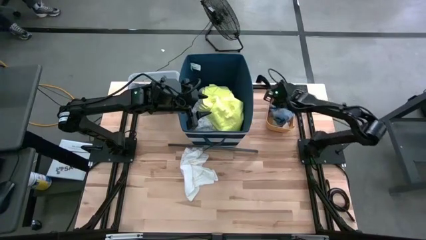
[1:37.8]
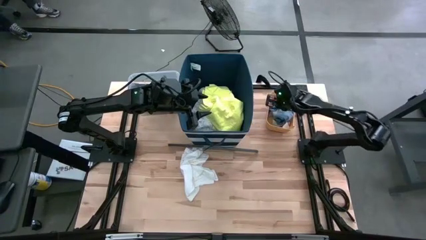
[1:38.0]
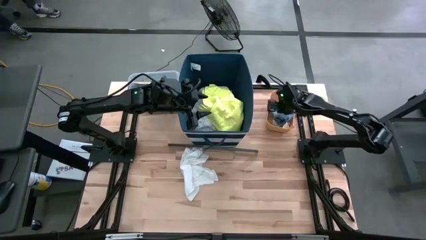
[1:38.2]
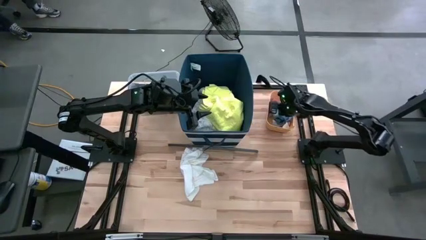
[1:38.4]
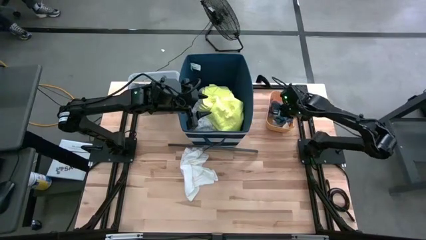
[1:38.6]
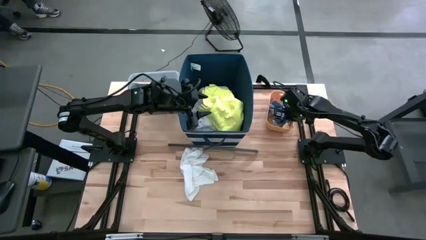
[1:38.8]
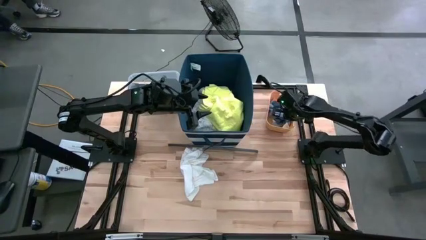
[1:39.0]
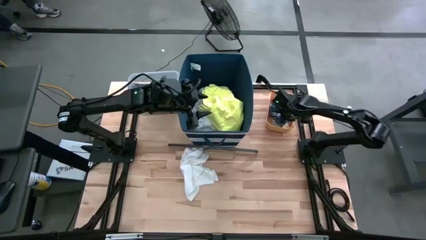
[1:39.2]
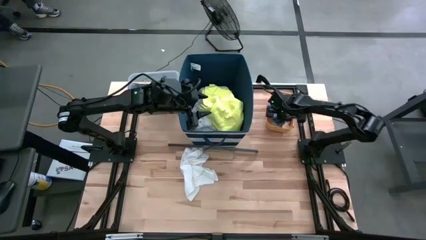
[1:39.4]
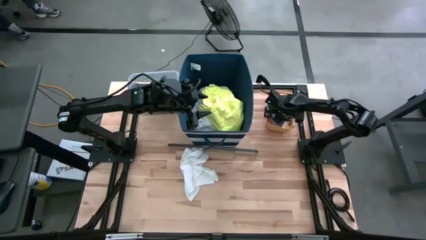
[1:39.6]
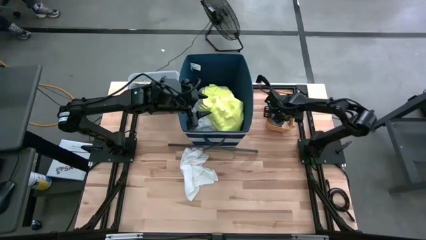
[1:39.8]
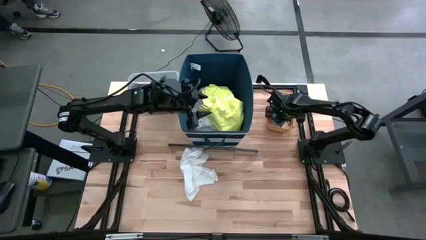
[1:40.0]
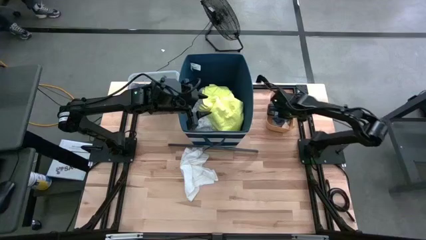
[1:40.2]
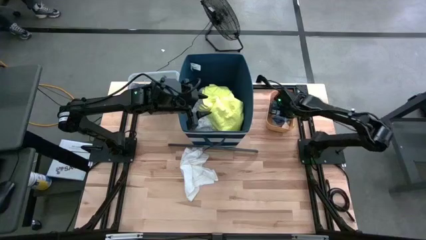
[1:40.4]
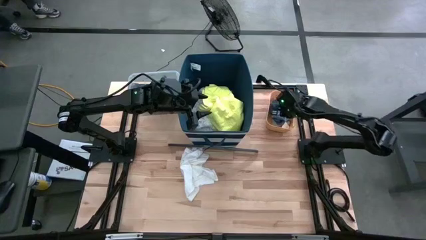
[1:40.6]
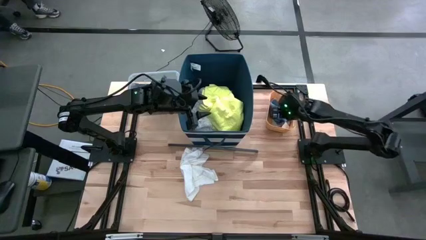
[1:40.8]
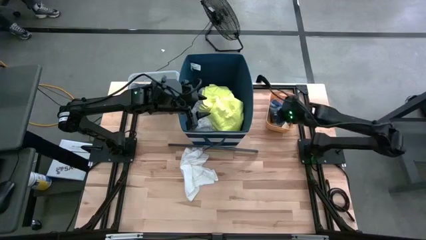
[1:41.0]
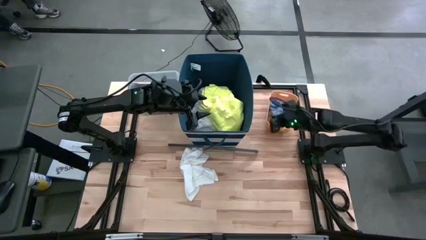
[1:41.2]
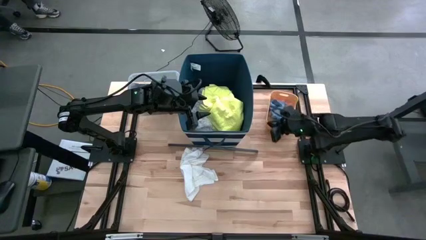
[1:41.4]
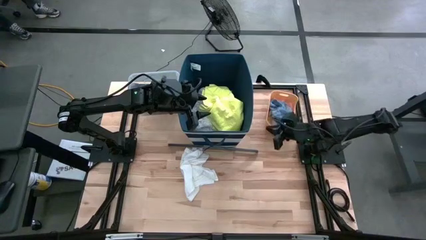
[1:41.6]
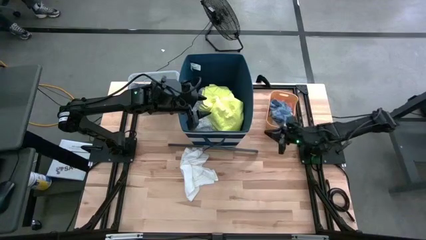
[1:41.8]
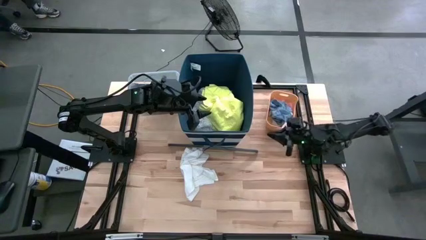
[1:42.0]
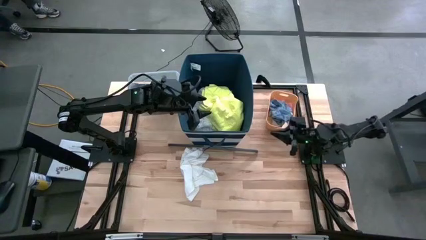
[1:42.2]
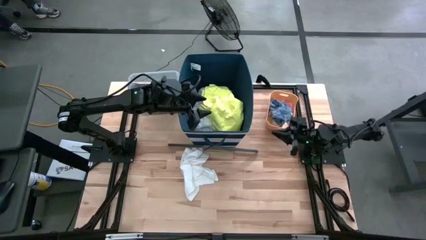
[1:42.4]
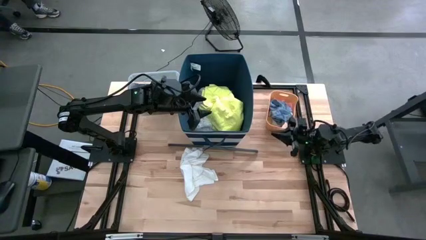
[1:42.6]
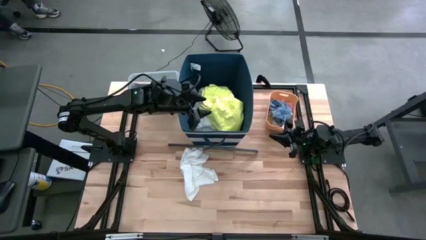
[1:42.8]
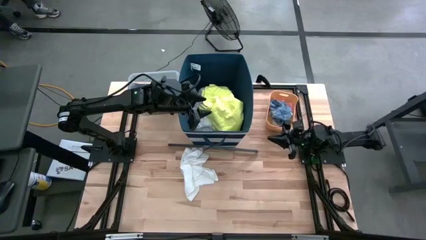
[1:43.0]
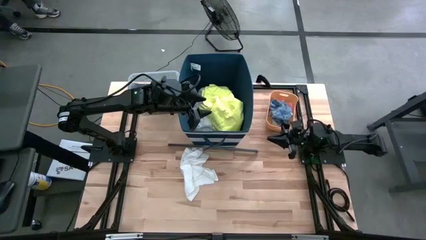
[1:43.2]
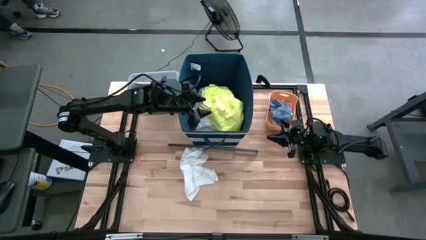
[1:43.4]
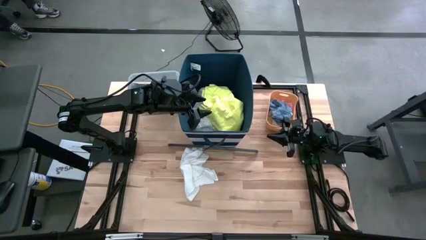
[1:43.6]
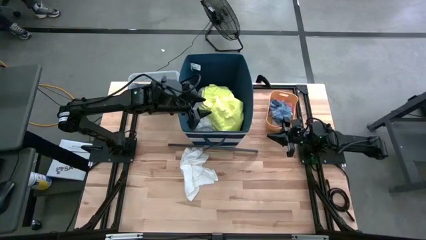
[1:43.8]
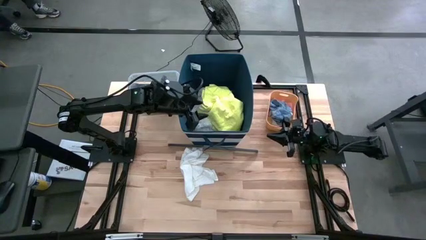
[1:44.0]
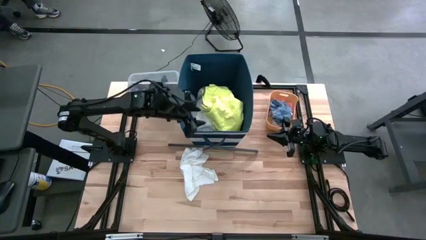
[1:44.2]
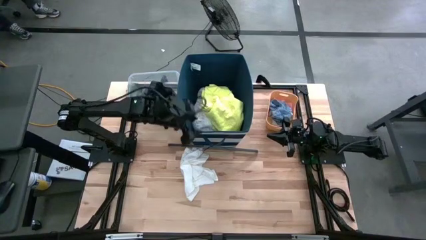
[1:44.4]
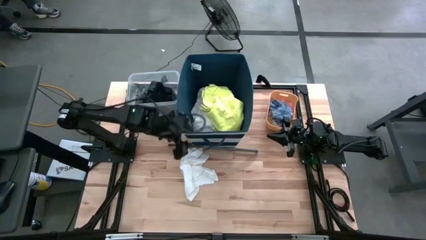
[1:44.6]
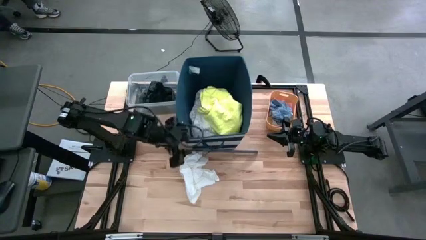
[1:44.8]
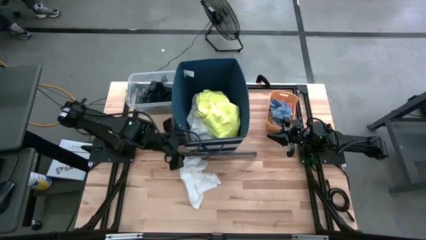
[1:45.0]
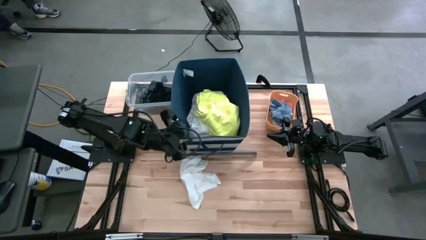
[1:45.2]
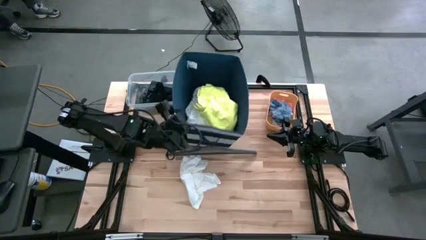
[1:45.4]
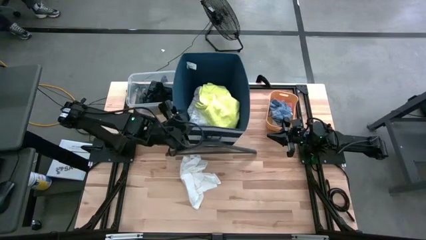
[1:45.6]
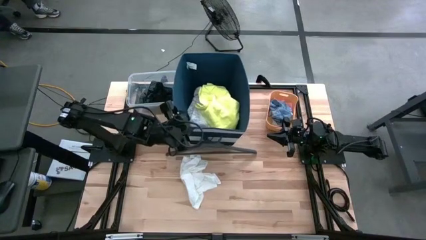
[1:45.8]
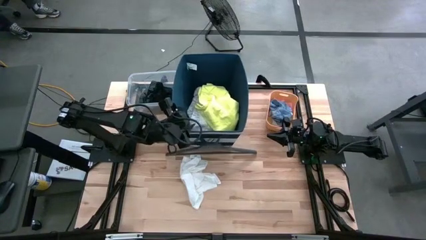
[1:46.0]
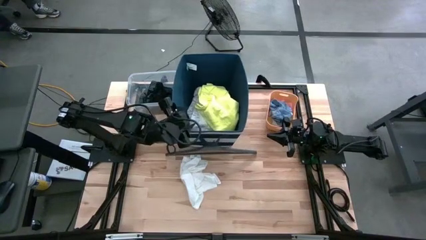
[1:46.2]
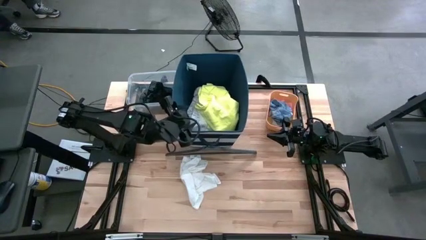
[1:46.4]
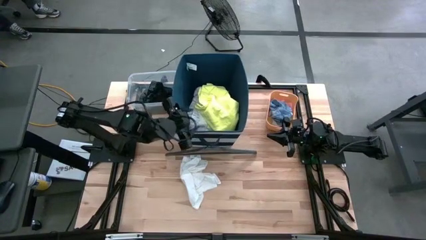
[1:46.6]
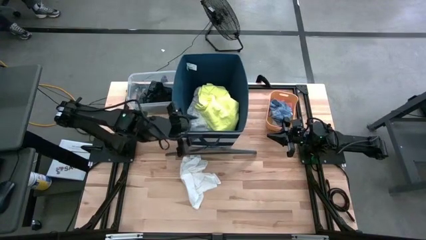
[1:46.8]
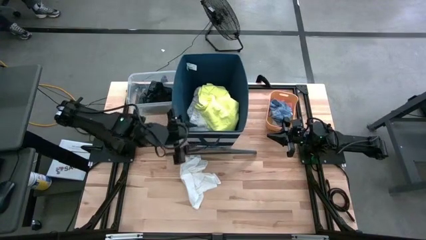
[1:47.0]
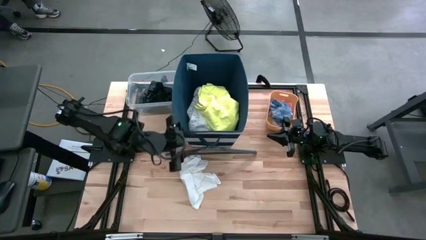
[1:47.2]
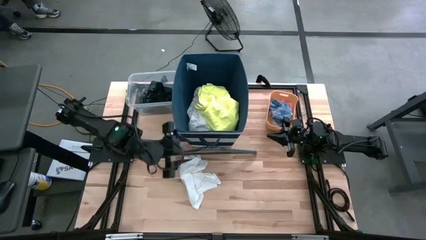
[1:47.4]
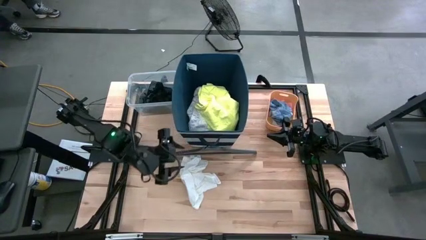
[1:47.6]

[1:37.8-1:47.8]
Task: Pick & Place Cloths
Put the white boxer into the transparent container

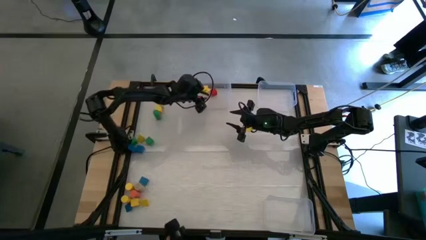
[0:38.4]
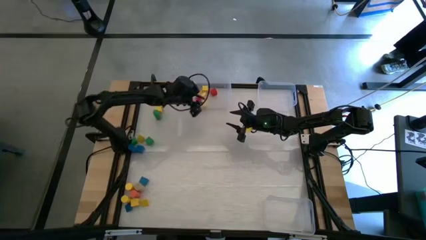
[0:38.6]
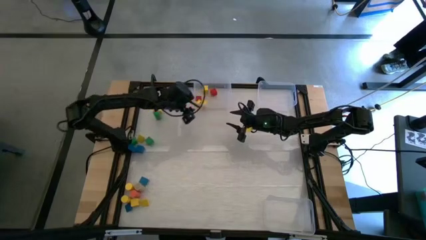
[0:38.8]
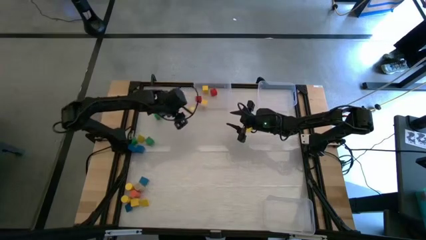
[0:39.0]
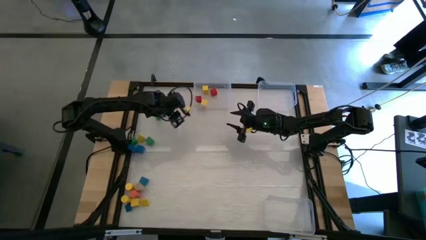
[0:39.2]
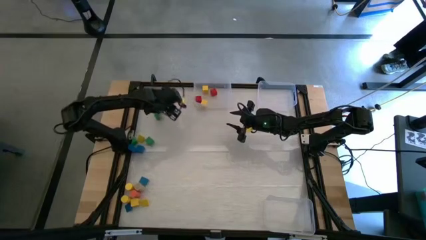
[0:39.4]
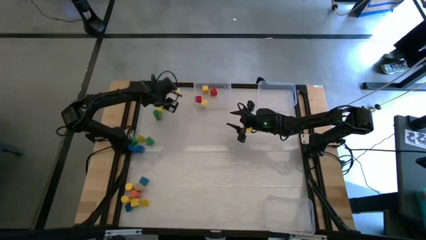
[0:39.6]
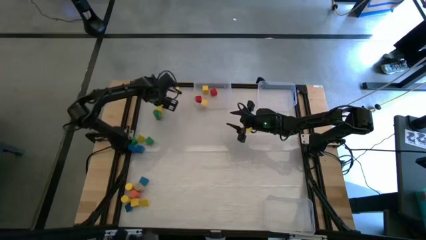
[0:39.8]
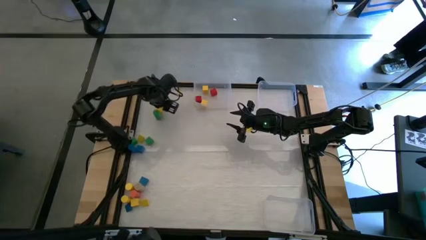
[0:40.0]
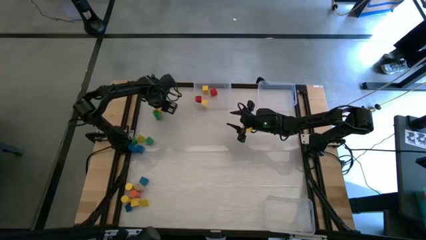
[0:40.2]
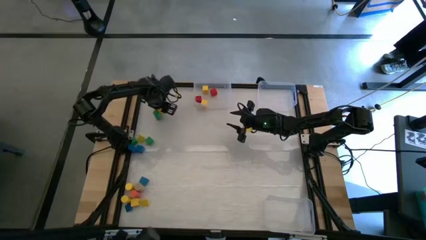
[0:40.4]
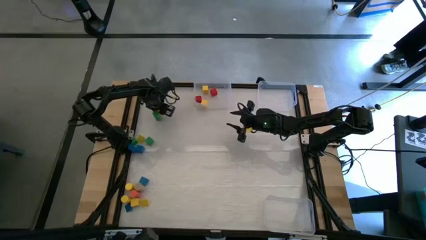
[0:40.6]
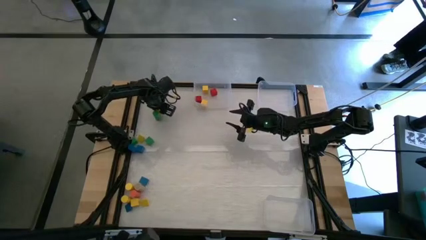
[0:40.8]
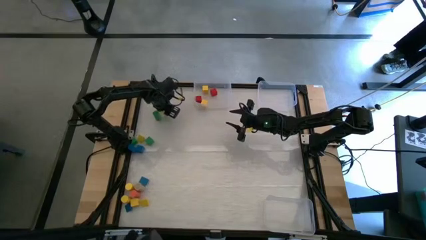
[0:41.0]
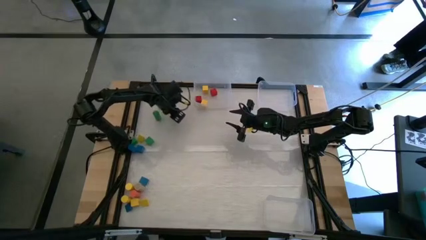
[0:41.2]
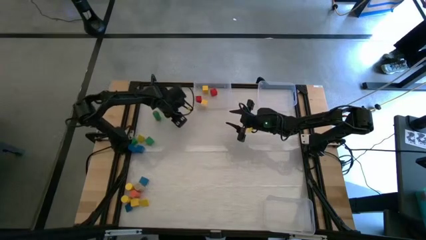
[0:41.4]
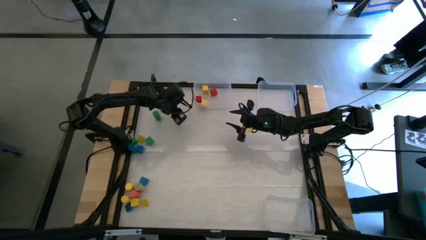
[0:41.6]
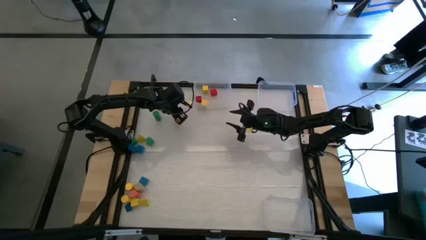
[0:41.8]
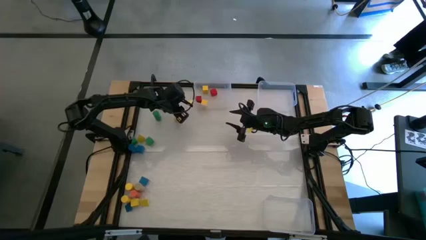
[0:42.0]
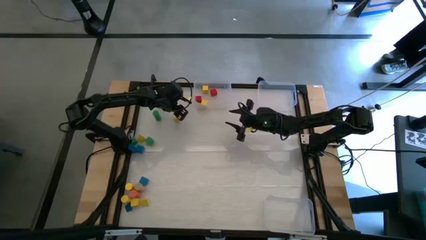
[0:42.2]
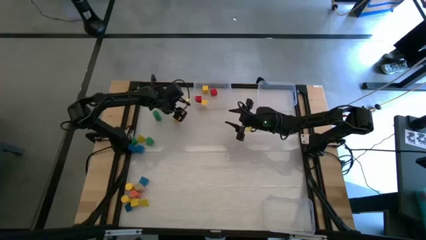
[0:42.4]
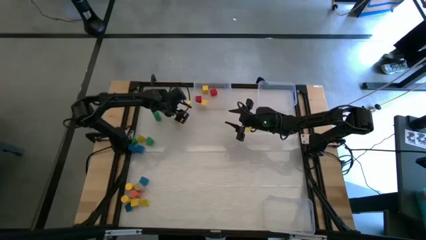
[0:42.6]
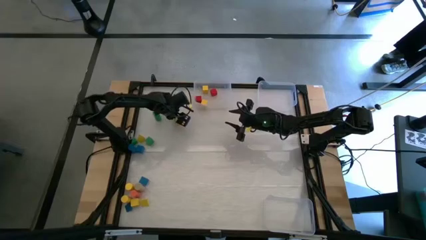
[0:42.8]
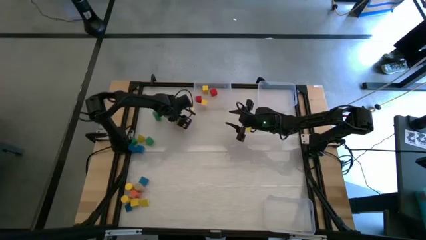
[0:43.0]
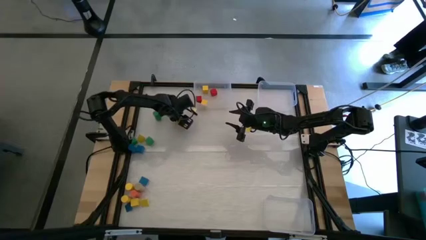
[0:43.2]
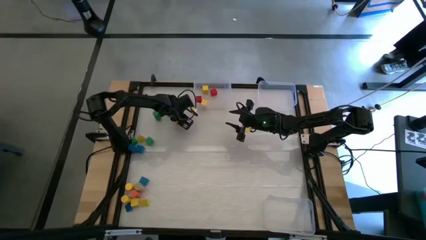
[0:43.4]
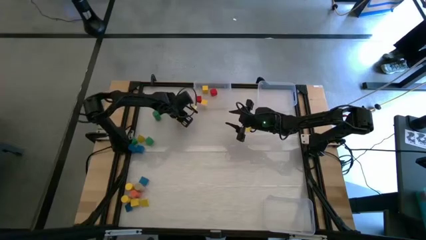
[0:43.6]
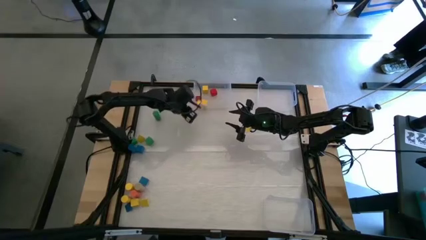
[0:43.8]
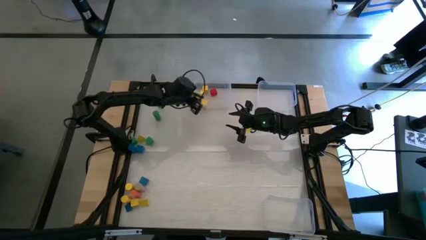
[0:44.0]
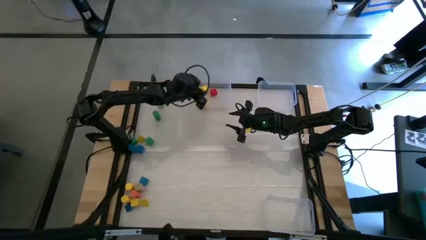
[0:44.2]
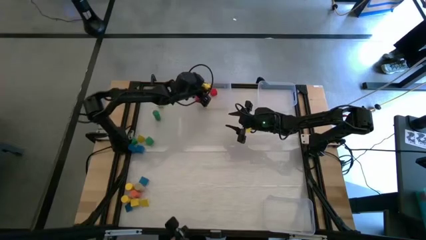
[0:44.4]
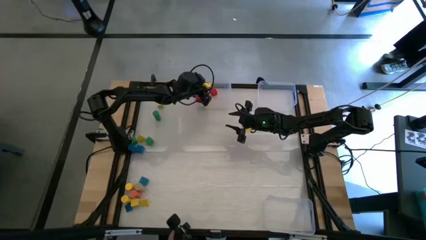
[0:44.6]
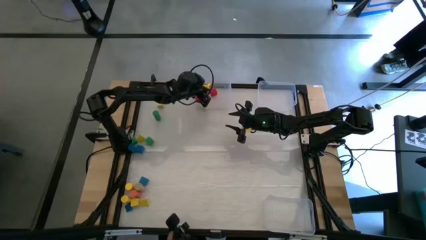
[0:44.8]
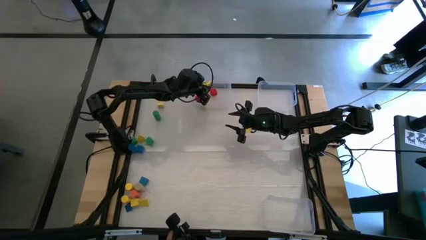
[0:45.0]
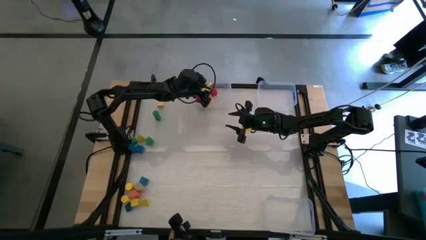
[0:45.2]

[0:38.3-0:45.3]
Task: Sort blocks by size
Put the square yellow block into the top left transparent bin
